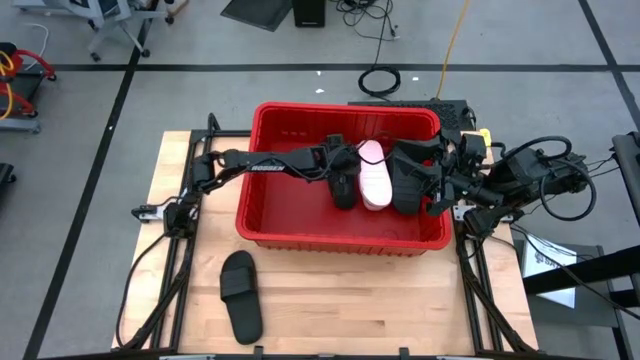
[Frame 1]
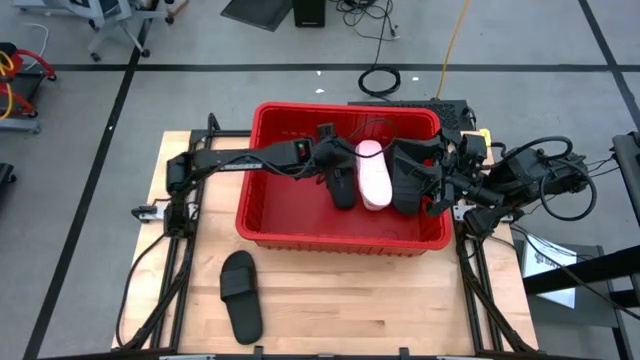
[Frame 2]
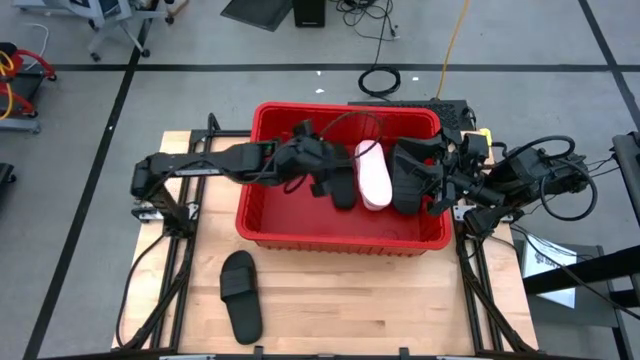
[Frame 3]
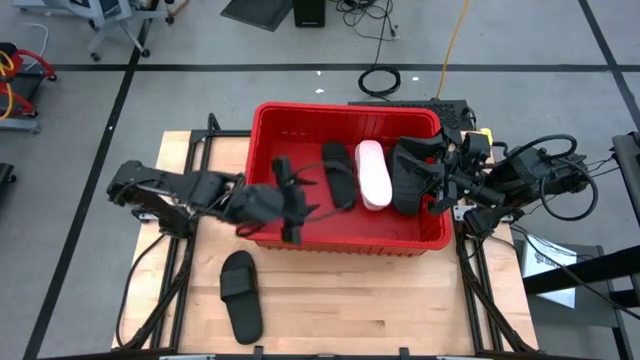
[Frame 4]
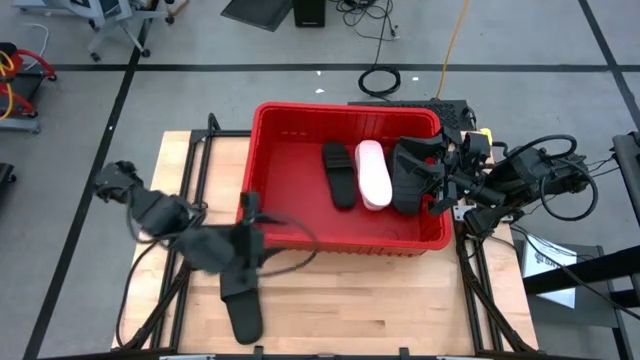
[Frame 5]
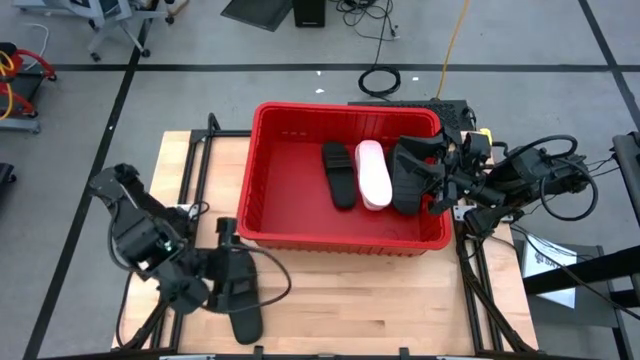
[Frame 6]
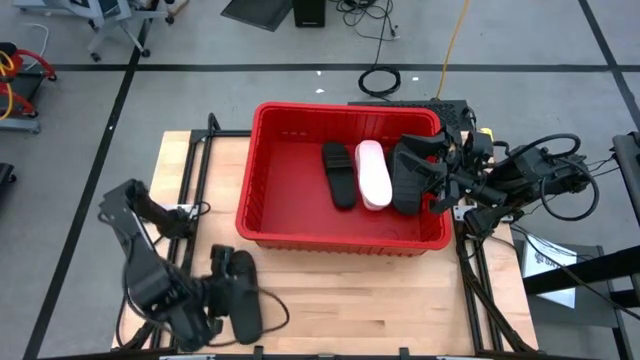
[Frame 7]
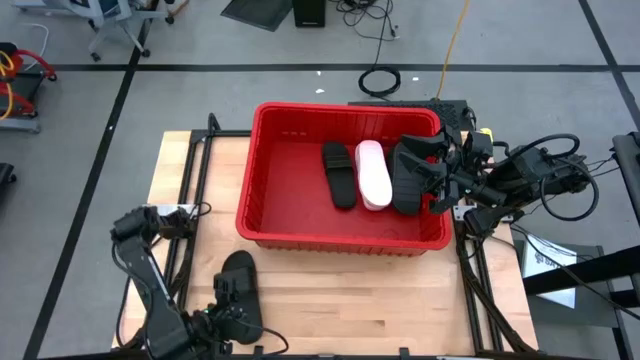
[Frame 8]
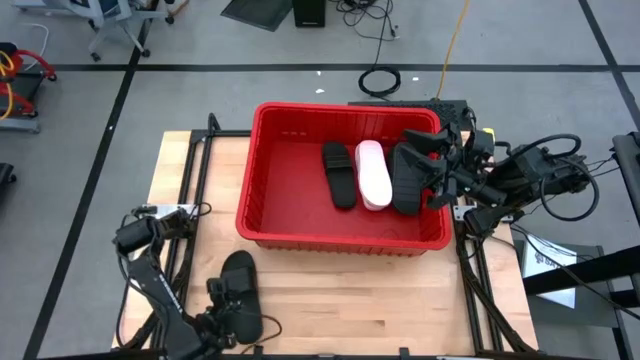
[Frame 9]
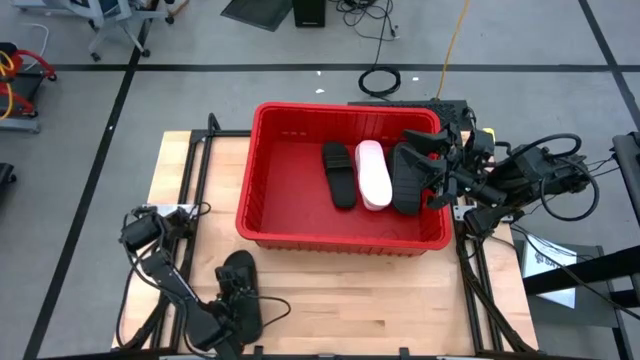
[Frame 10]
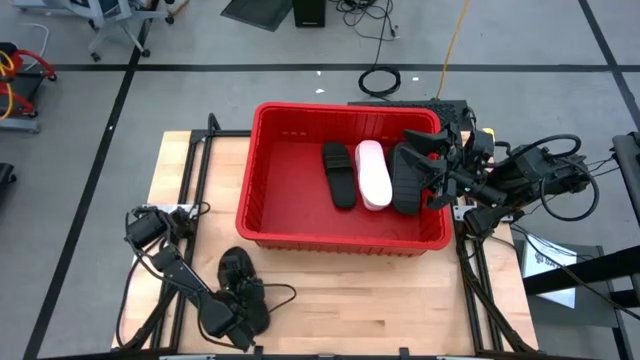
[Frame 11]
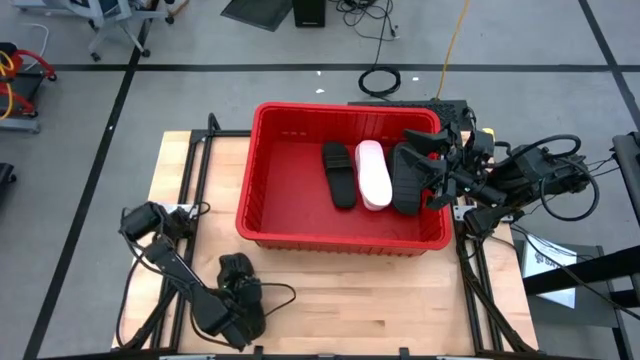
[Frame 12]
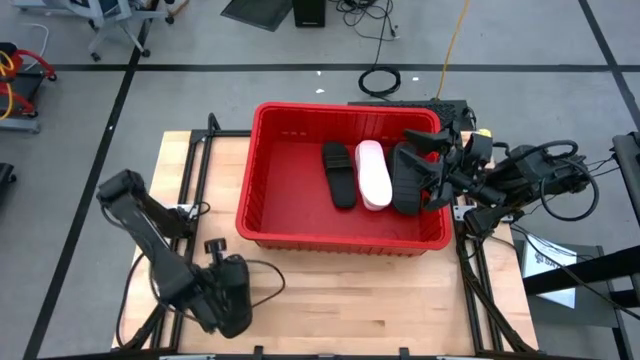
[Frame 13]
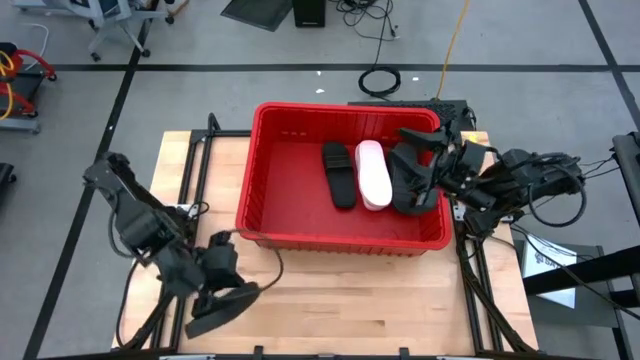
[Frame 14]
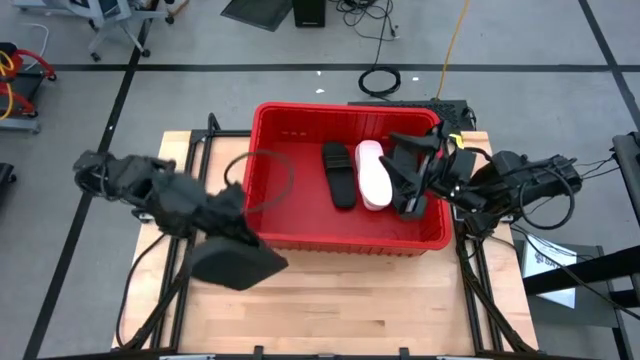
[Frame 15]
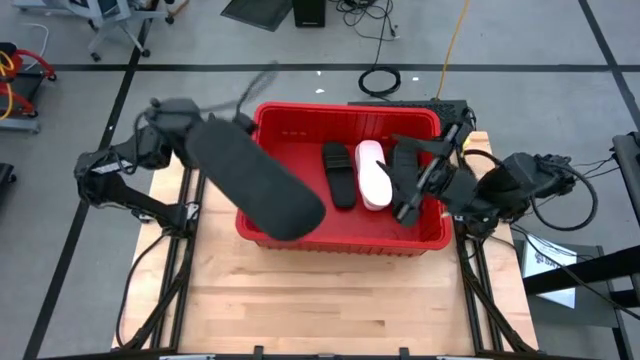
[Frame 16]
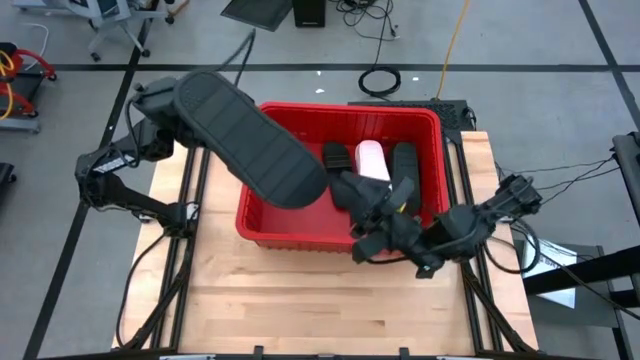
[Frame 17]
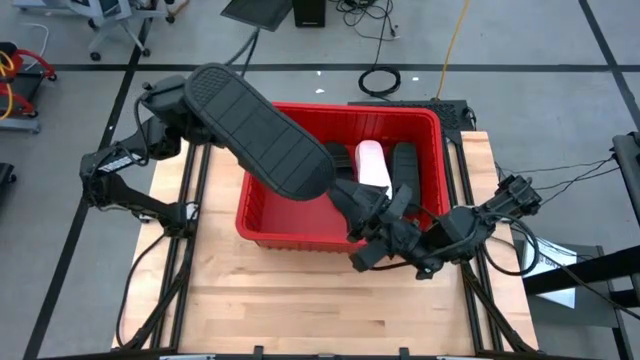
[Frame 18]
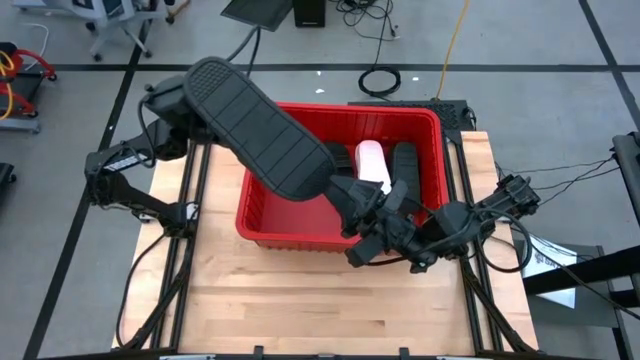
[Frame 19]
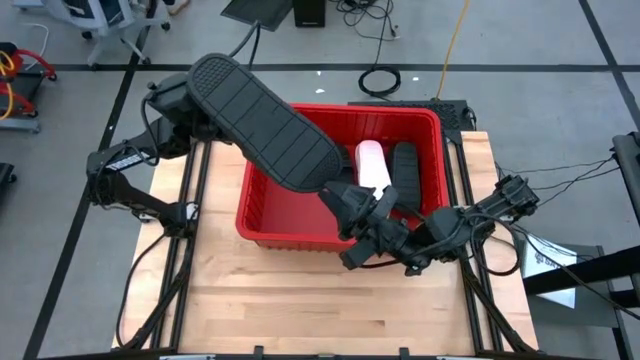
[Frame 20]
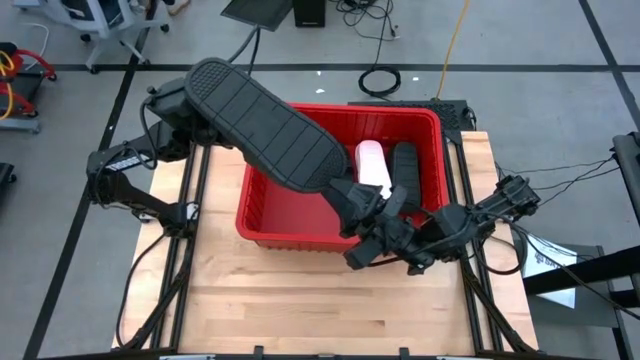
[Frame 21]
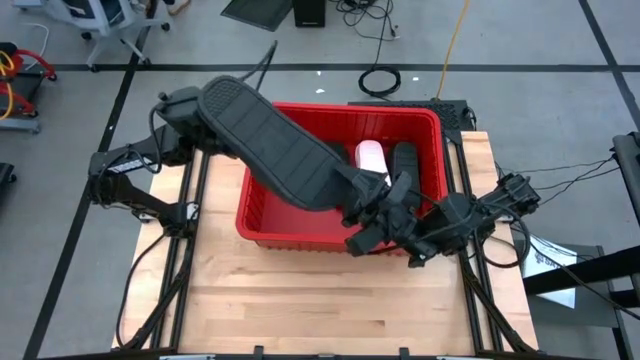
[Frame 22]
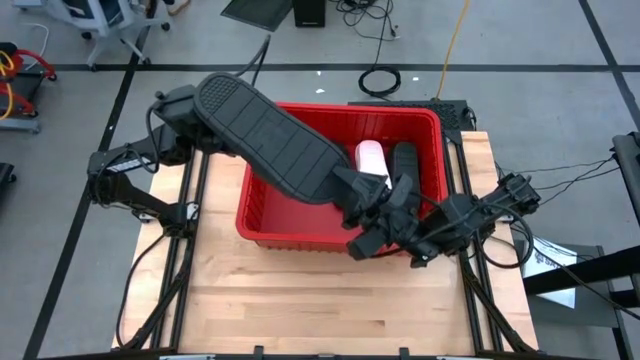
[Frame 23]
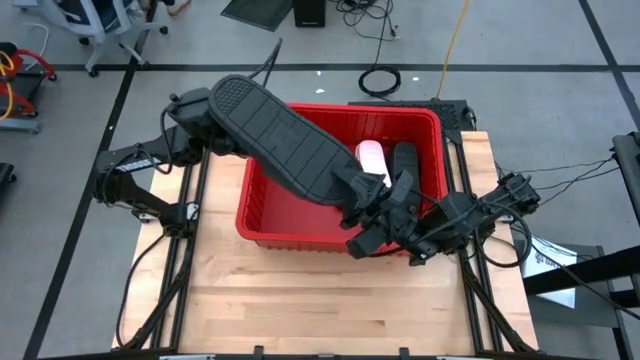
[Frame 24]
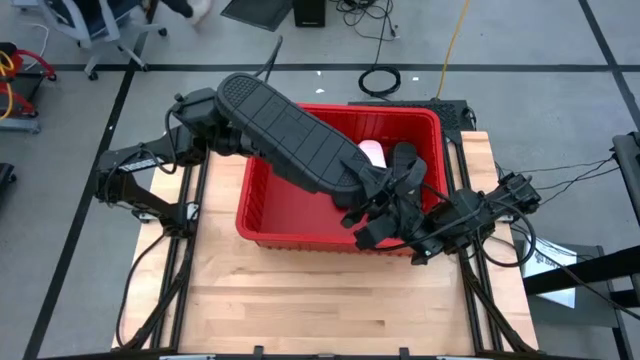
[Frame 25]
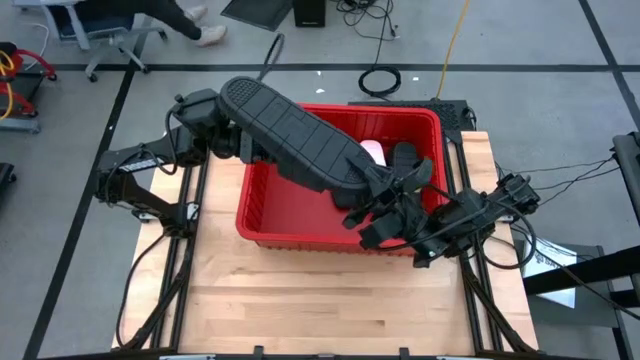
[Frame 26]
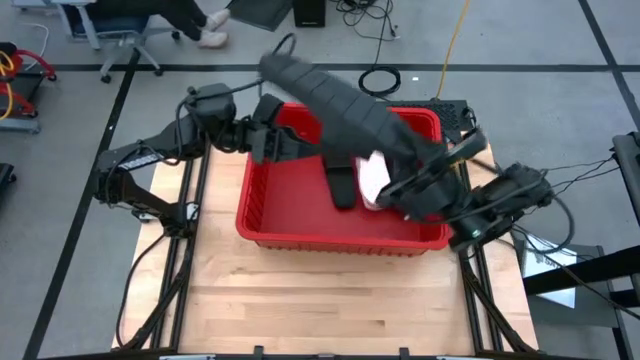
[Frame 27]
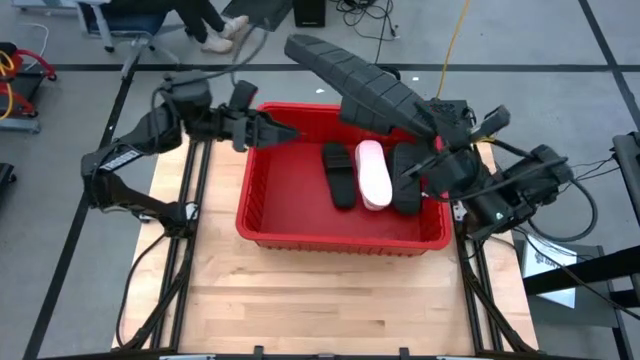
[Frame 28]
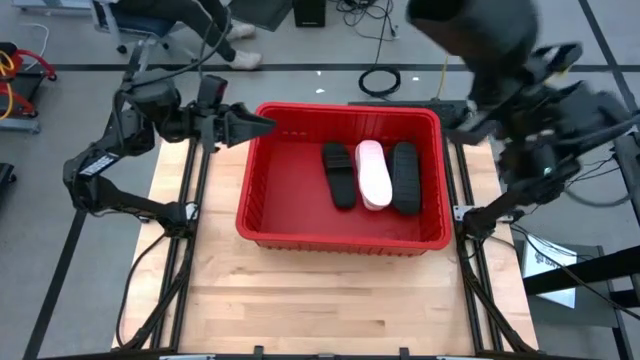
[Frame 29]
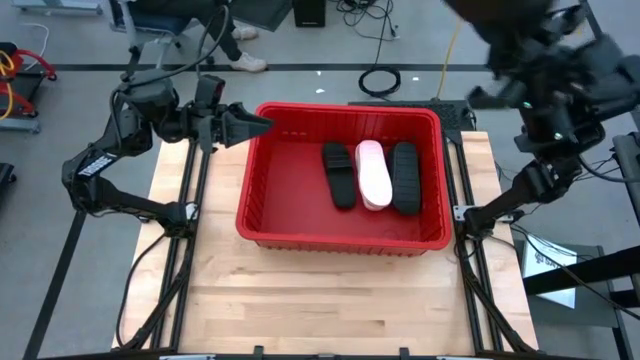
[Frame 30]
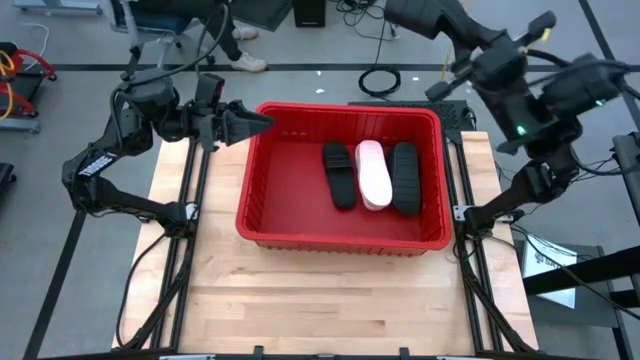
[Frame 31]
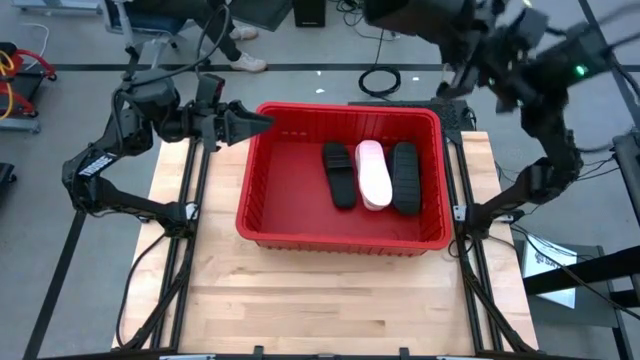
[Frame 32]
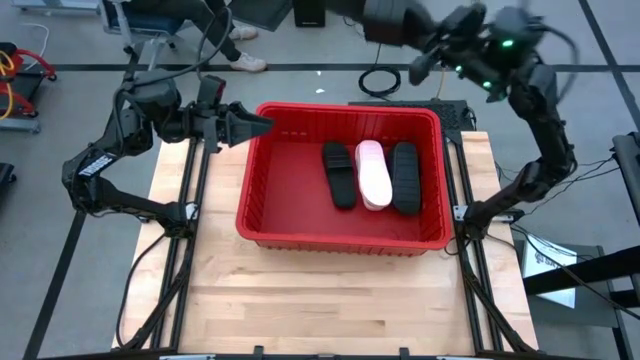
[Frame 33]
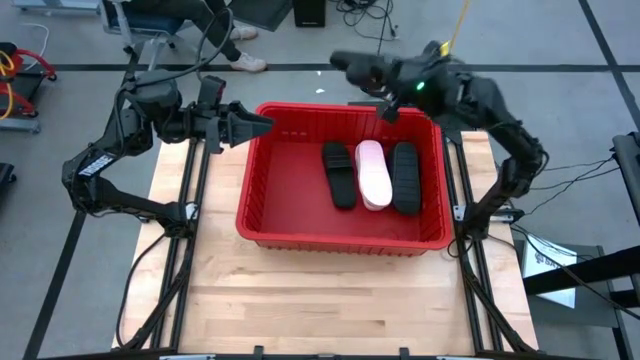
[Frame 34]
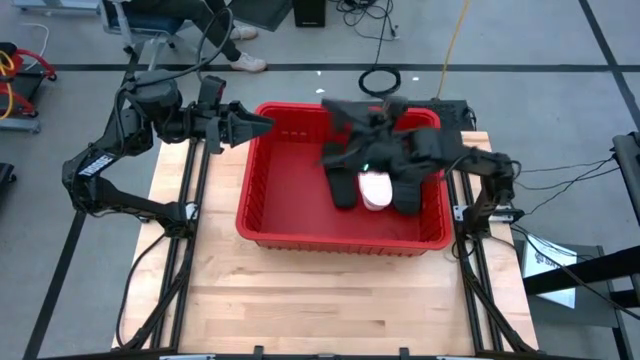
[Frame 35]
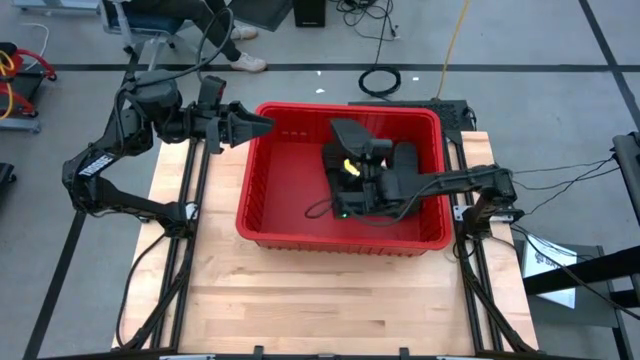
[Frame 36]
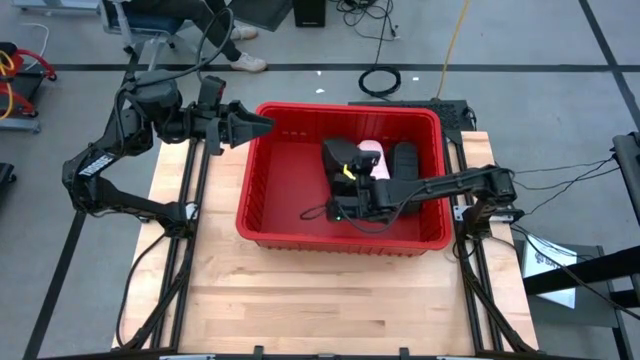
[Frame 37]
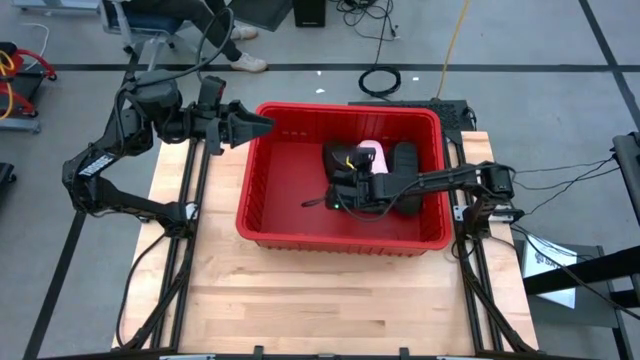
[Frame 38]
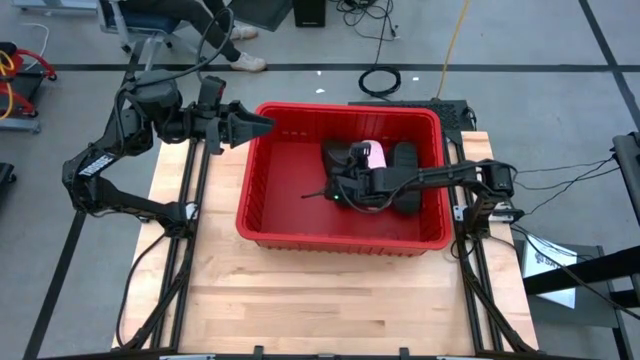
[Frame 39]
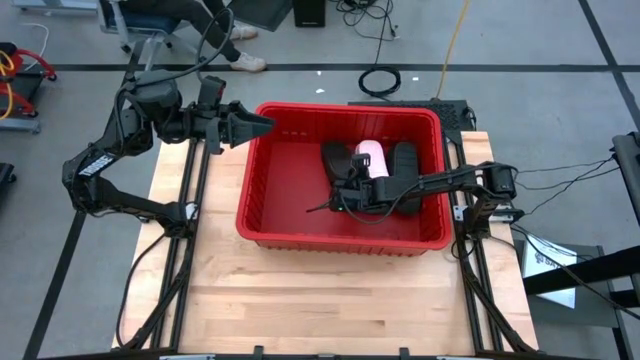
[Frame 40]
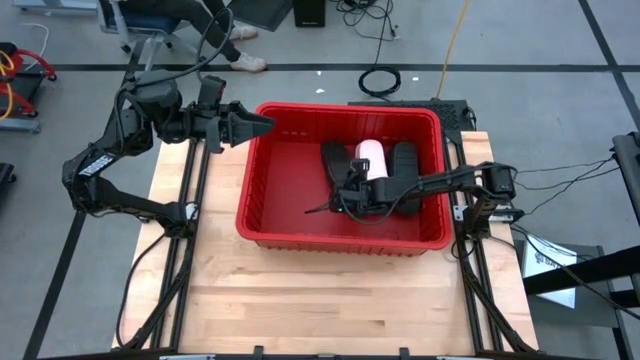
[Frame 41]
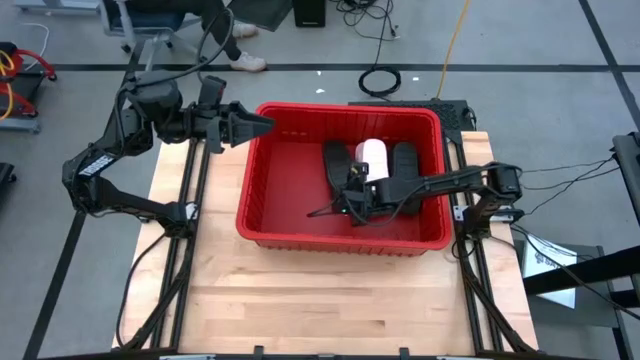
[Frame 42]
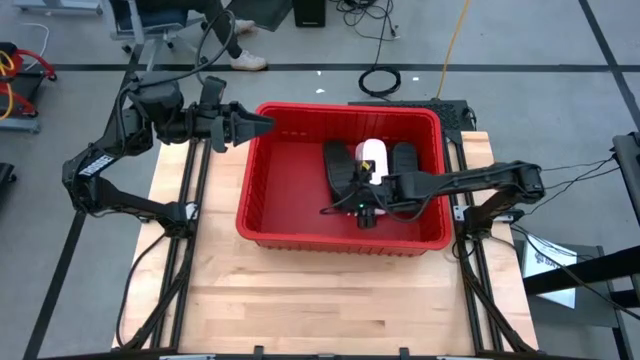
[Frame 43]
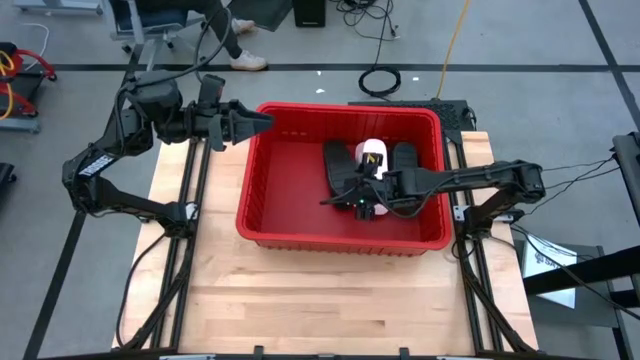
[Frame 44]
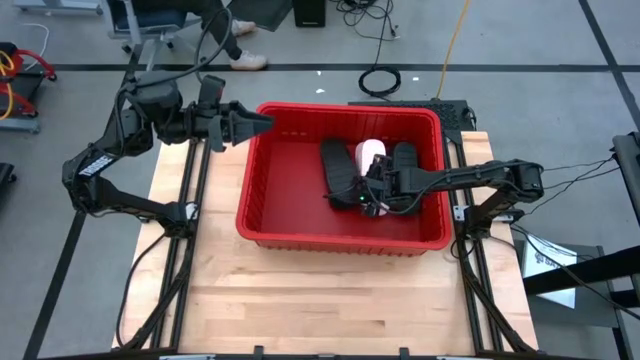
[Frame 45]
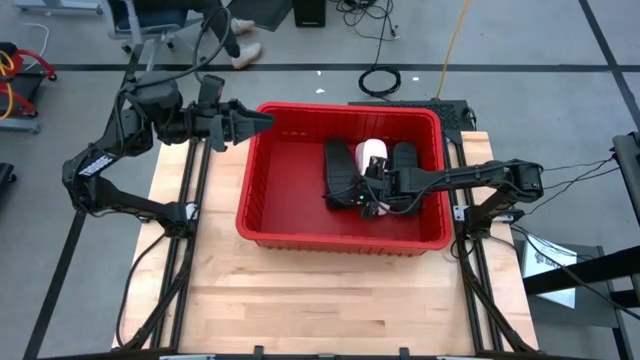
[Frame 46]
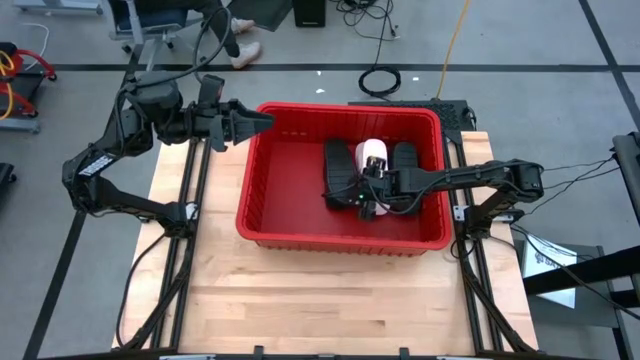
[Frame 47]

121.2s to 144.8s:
Task: Pick and place slides into bin
Put the black slide into the red container
